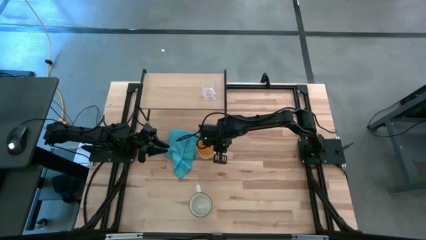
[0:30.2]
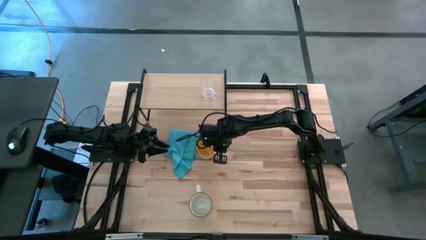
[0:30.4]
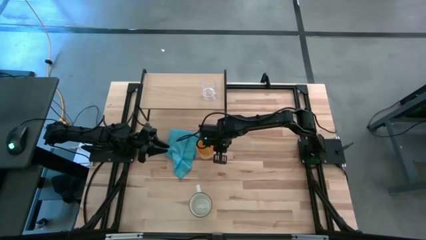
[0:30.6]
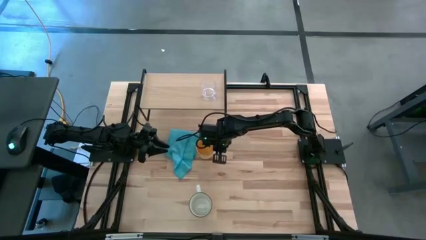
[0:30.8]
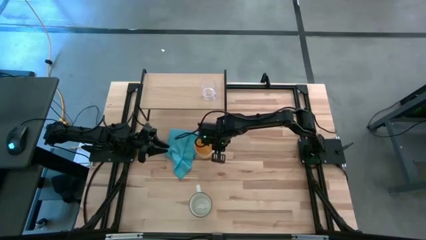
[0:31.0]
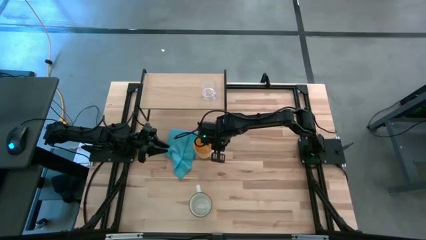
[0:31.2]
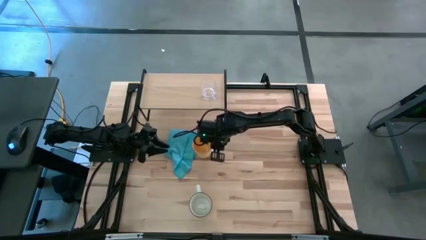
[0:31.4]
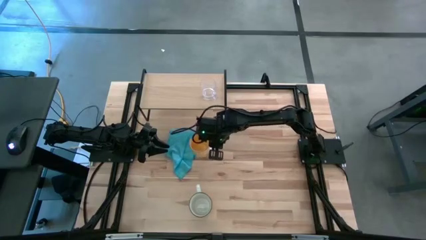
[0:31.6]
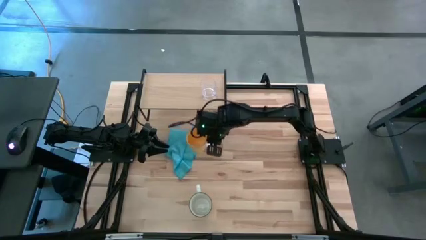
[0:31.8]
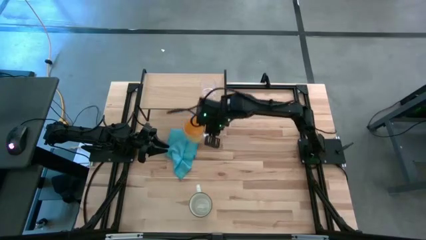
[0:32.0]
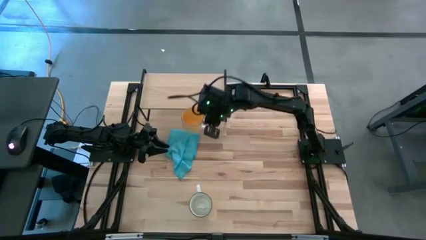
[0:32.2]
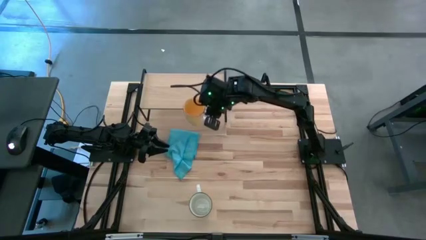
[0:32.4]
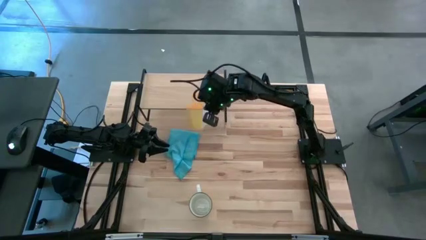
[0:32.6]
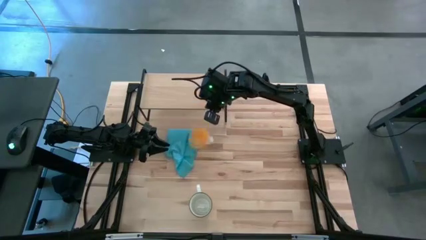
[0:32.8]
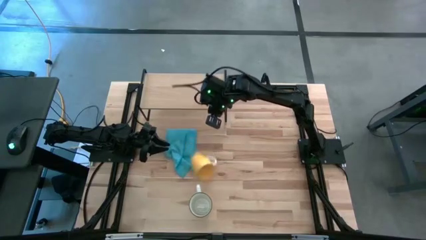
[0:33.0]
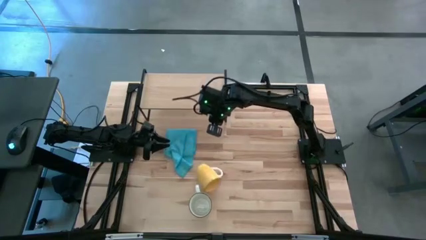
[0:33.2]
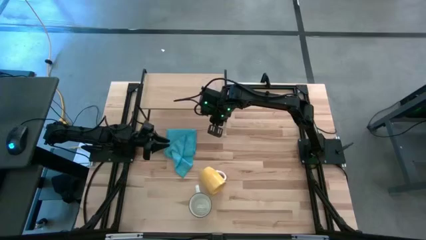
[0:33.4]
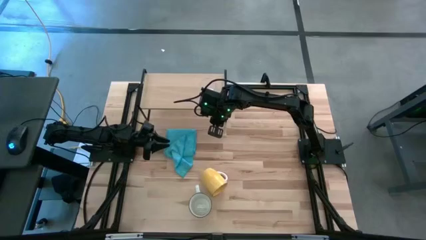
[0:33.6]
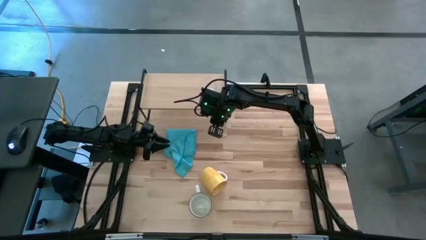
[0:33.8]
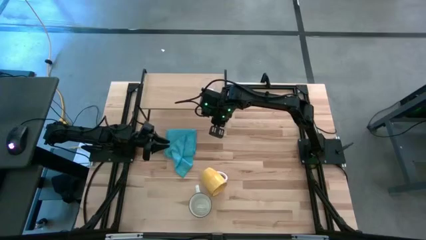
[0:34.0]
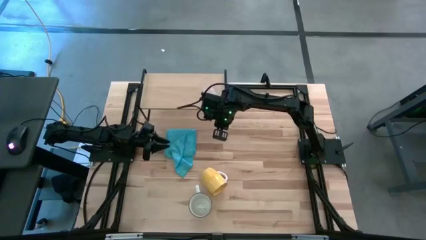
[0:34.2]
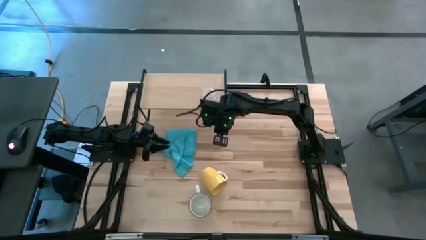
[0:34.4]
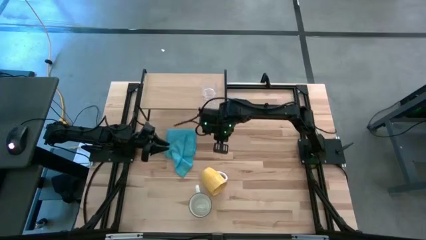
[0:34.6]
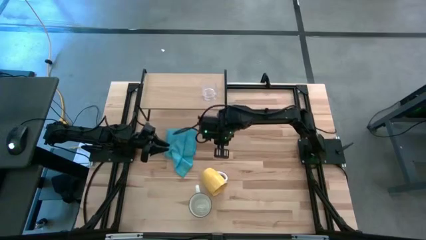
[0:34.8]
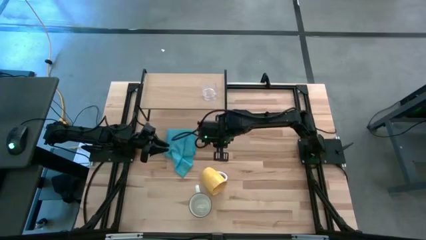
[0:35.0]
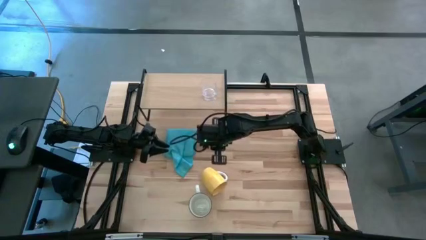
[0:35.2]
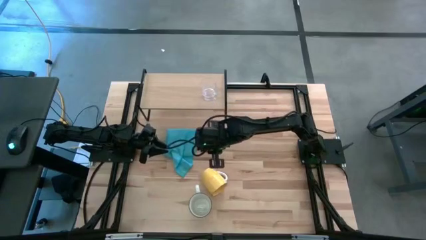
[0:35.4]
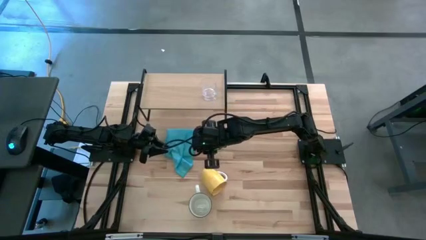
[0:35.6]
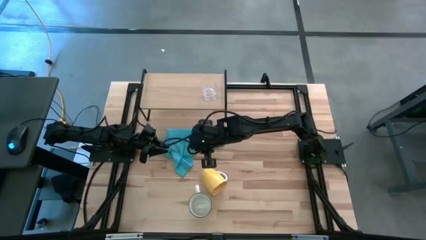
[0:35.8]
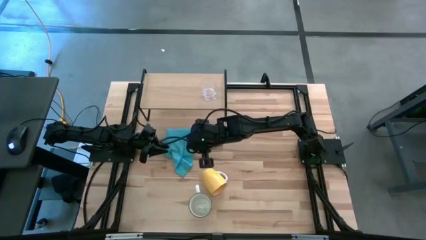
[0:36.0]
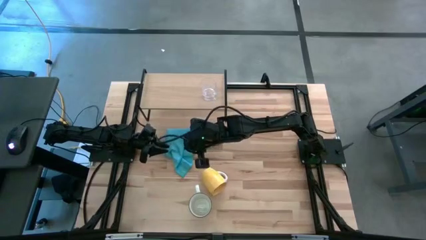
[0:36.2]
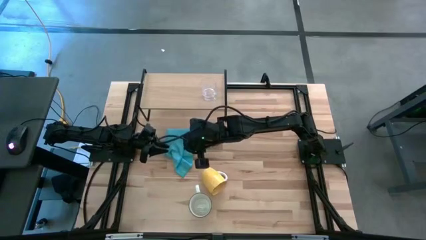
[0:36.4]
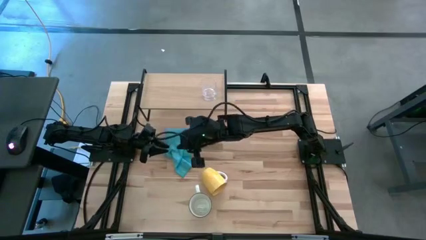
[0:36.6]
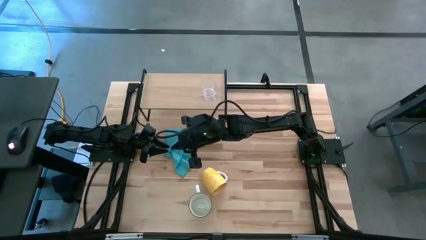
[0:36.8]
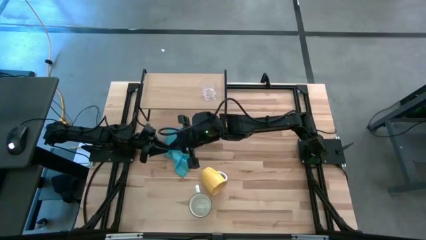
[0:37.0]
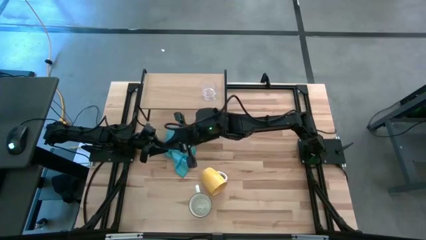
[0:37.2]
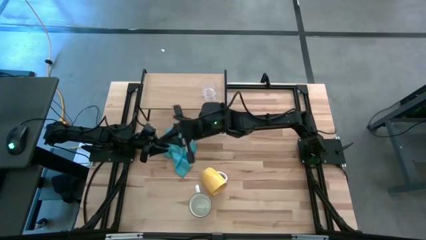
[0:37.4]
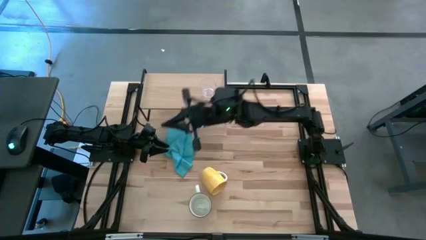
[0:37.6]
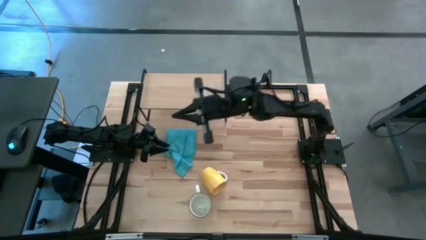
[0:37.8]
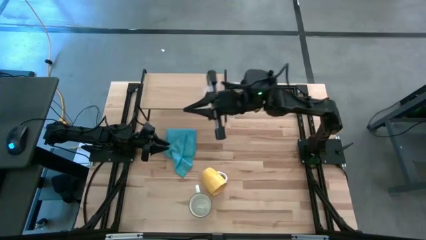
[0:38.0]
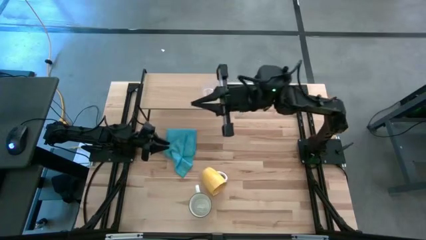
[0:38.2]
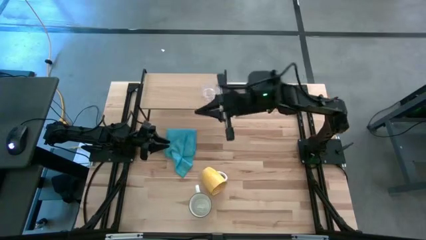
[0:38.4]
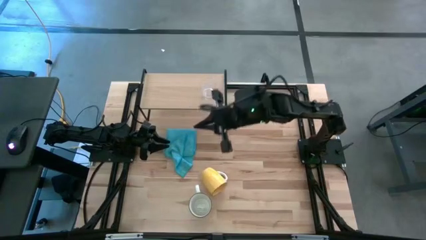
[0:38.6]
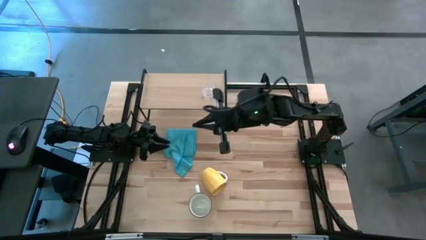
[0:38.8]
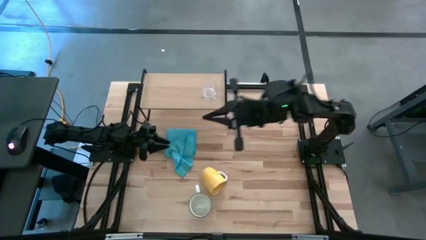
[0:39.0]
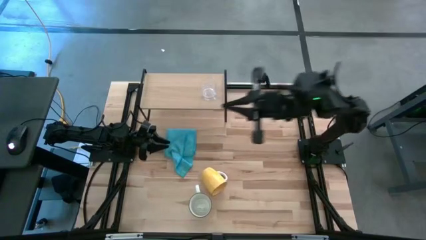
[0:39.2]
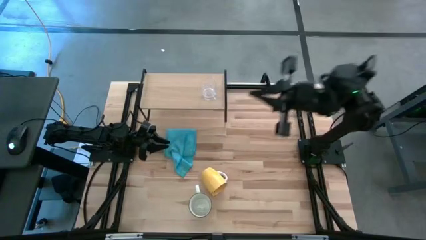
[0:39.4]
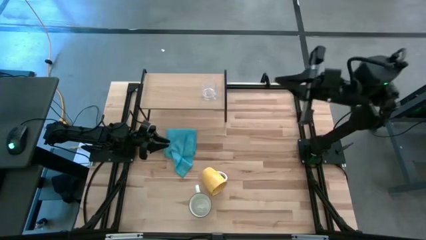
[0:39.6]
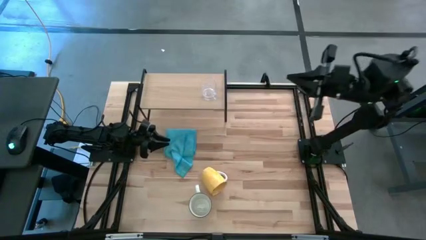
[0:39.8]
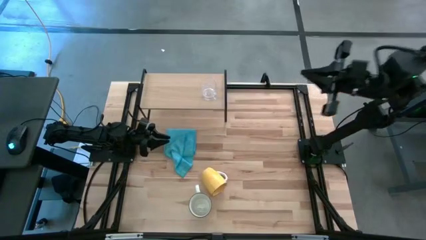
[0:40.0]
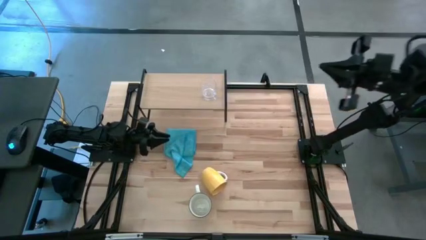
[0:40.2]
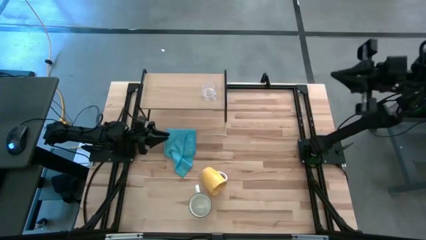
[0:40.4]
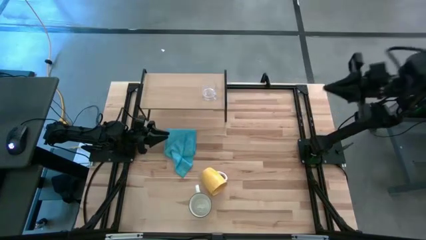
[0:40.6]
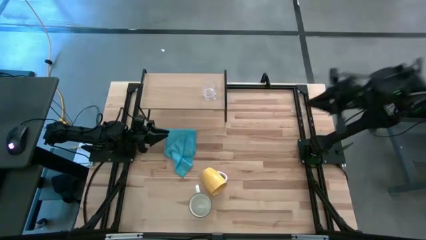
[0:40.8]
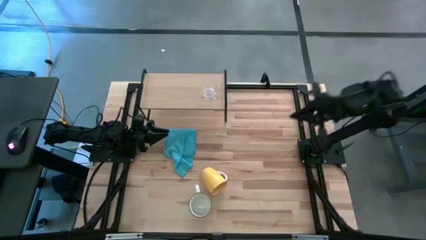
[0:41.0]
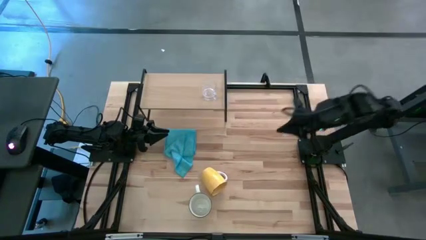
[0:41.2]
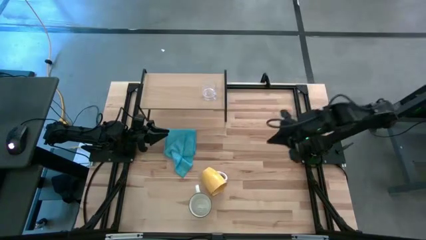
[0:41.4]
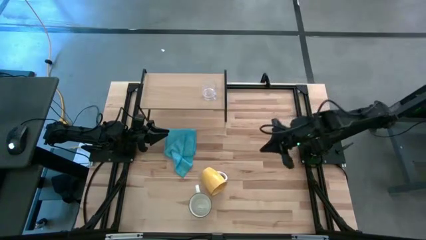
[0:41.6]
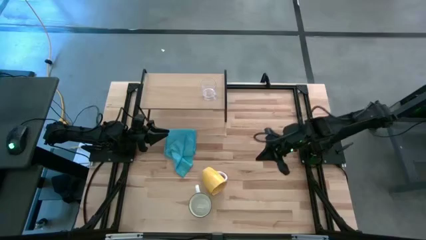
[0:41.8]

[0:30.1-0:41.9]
Task: Stack small to large cups/mugs on shelf
Put the yellow mug on the shelf
